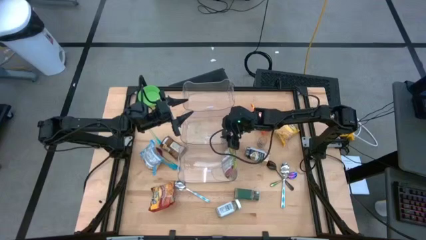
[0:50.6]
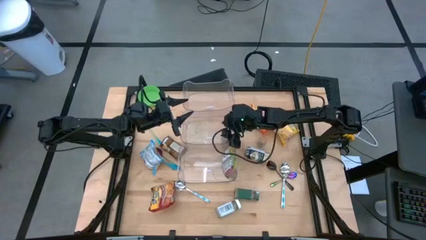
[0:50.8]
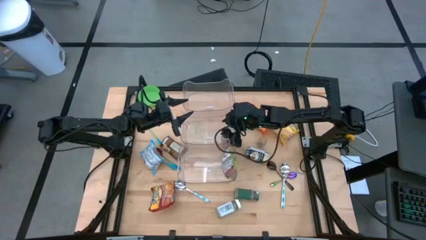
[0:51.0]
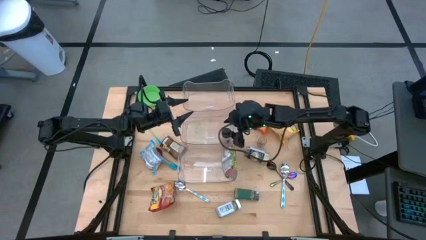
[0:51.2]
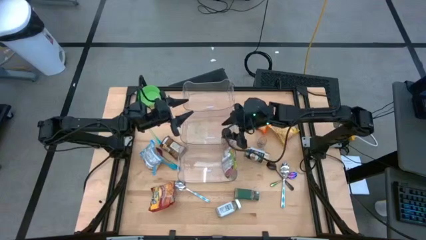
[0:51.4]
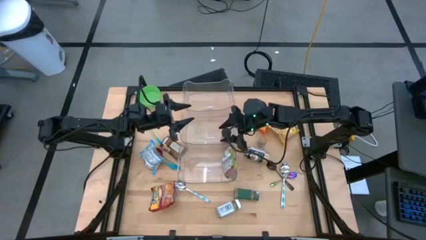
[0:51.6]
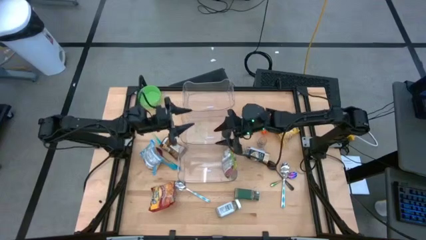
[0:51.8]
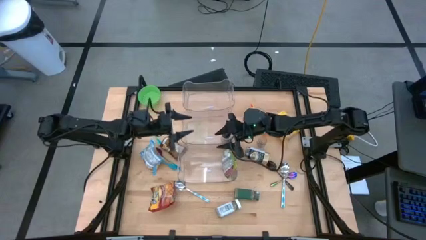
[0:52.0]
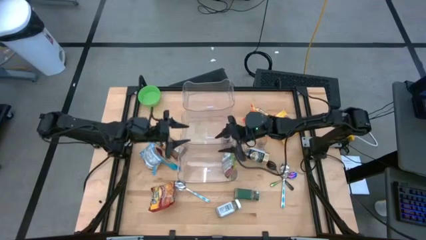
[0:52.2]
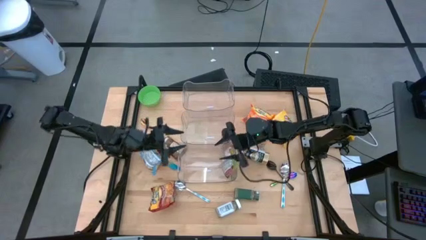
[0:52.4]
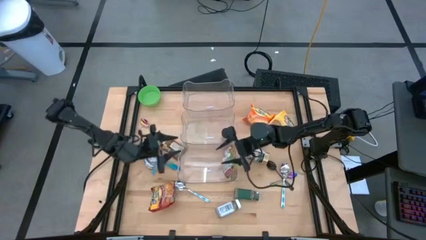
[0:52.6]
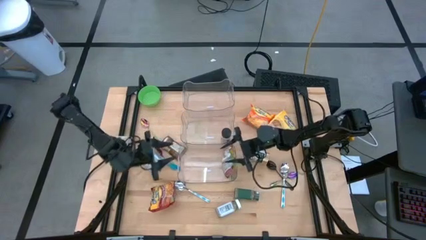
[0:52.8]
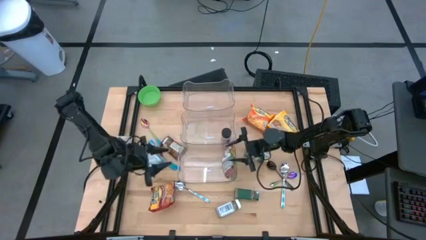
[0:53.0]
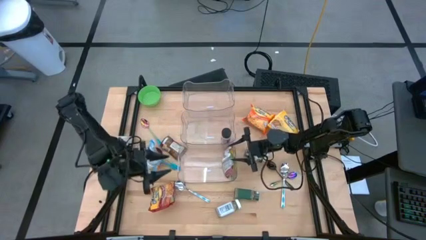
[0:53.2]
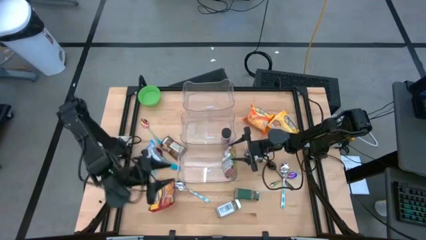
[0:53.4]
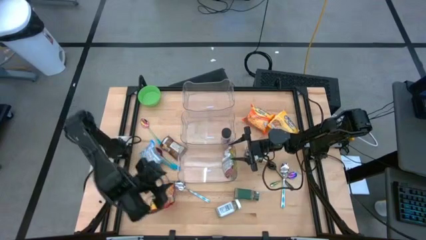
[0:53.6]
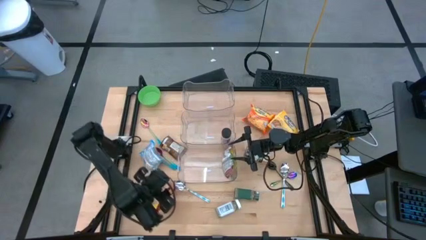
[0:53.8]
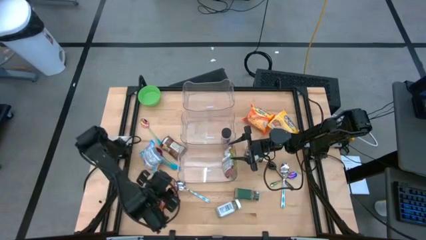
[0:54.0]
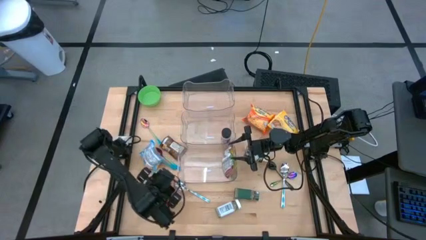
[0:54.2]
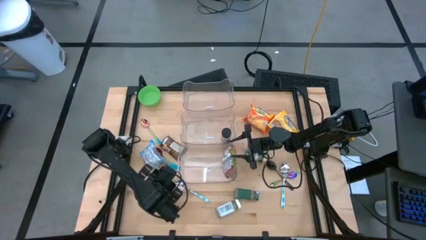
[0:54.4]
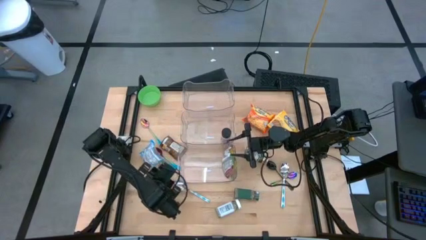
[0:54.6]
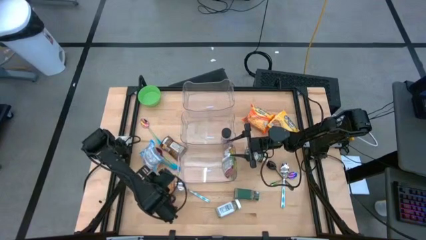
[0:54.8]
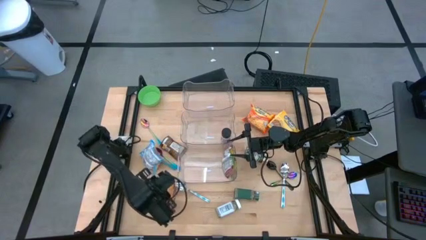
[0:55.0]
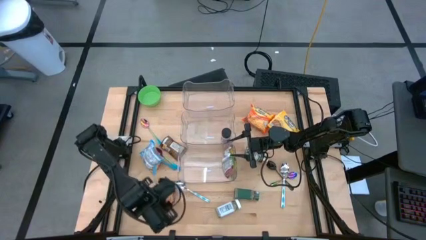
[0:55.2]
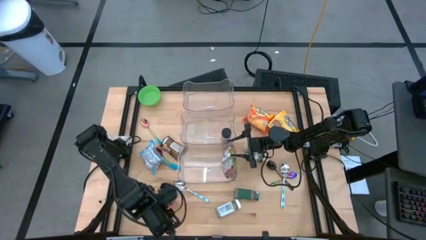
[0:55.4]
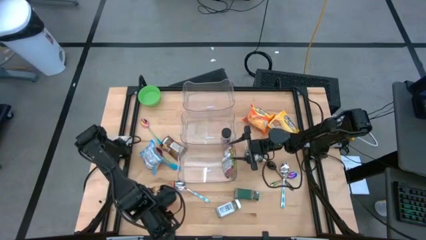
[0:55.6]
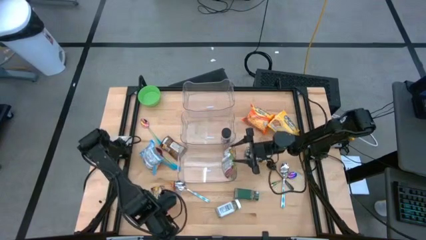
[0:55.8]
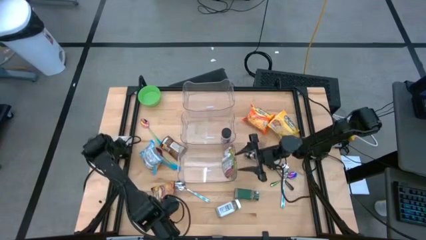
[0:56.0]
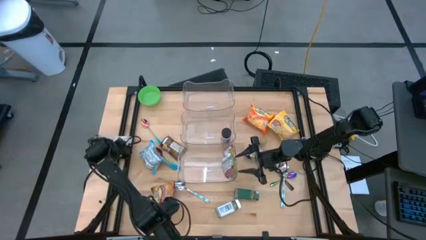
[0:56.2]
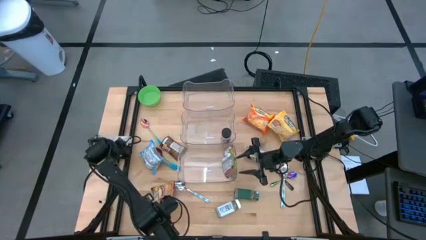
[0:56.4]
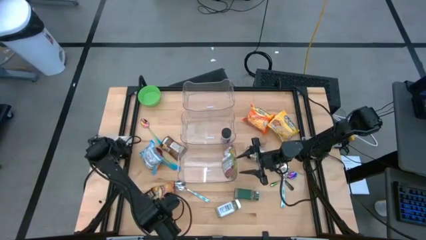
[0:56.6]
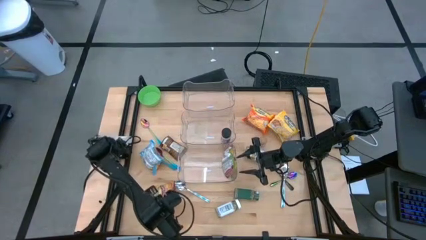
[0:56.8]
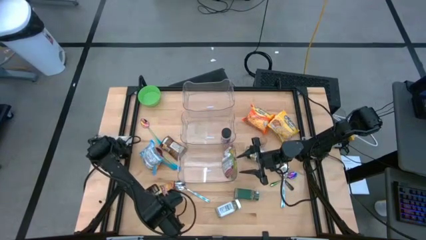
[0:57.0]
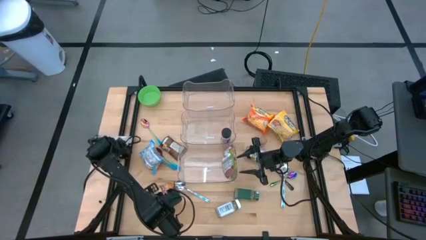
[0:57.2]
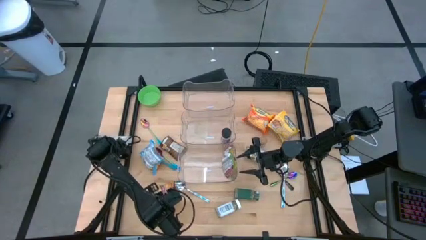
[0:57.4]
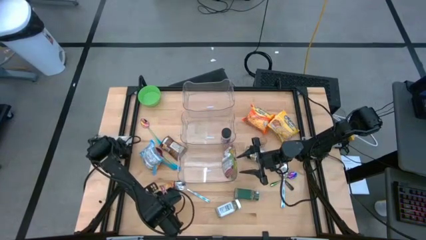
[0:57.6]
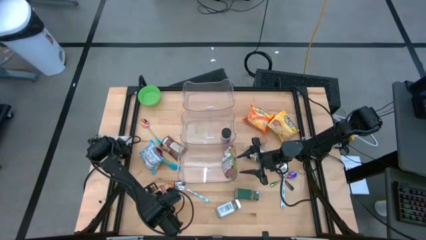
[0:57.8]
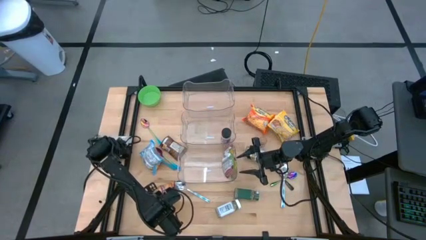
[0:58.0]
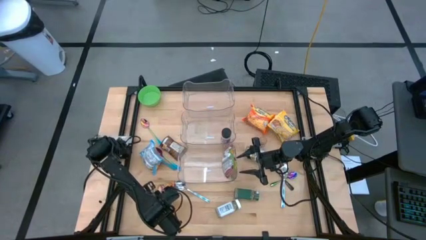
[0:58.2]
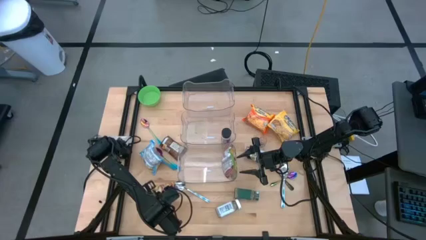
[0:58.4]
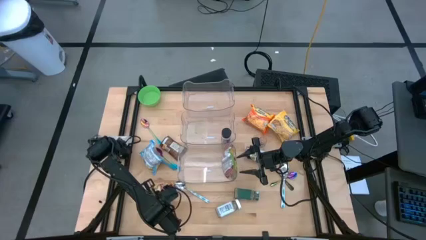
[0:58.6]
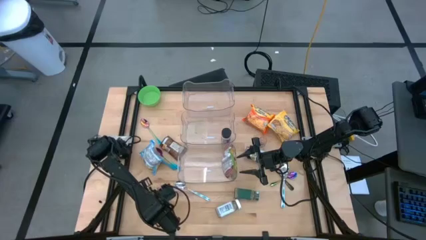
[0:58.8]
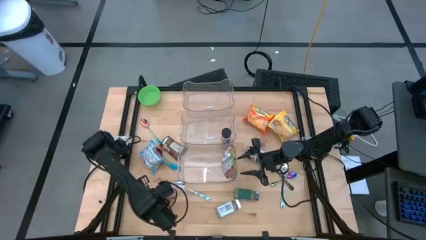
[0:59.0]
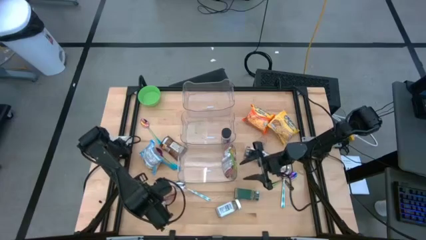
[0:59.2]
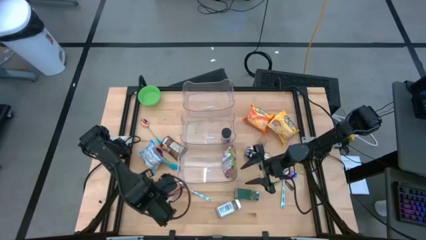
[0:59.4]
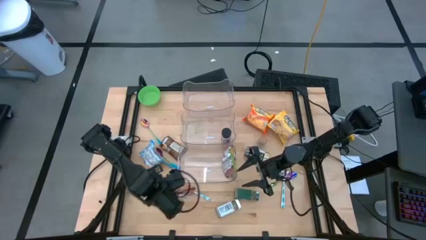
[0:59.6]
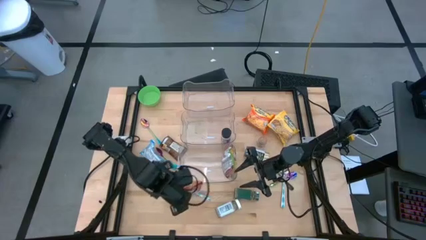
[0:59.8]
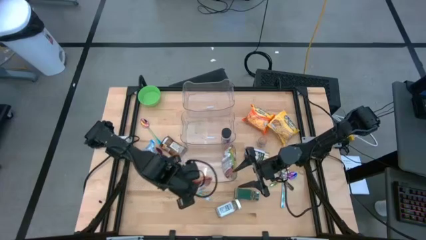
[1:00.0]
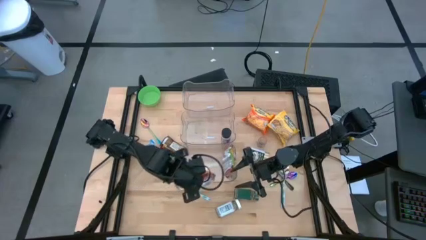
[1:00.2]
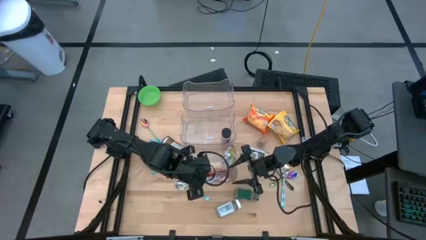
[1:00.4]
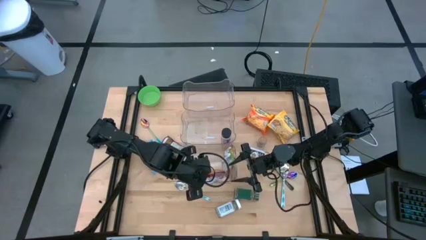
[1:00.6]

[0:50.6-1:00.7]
Task: Pick & Place Food Item
Put the red noodle pack into the bottom transparent bin

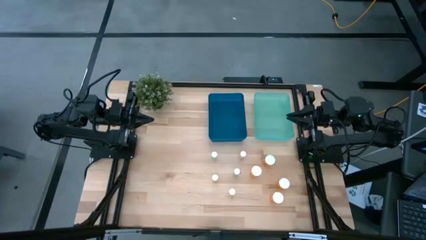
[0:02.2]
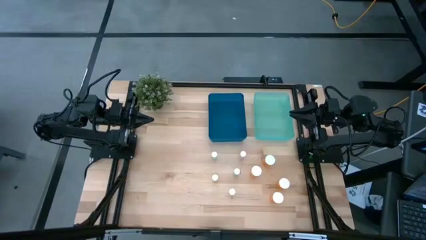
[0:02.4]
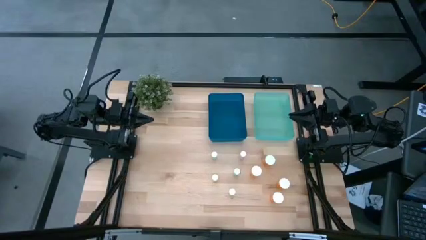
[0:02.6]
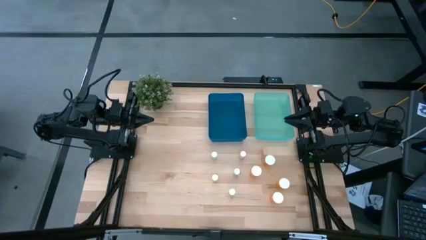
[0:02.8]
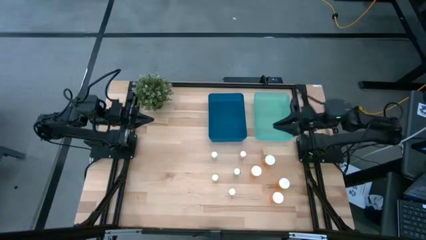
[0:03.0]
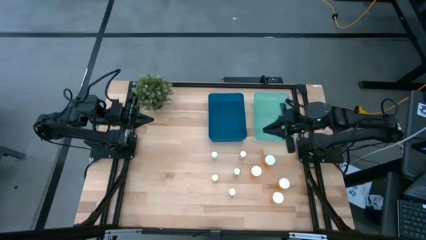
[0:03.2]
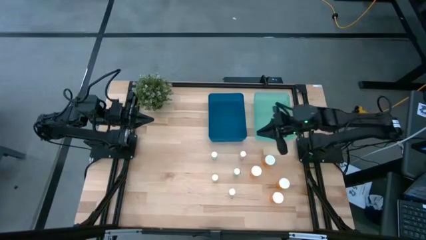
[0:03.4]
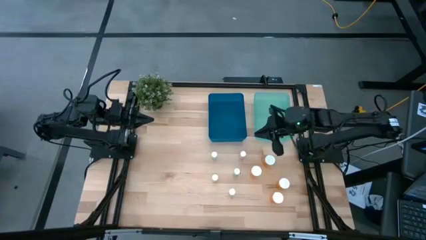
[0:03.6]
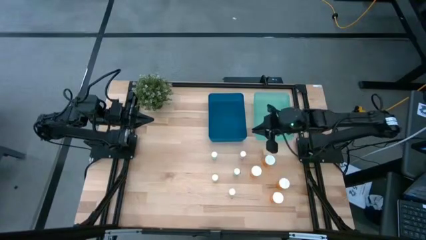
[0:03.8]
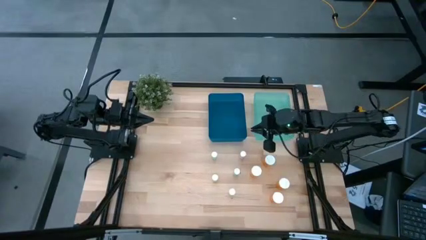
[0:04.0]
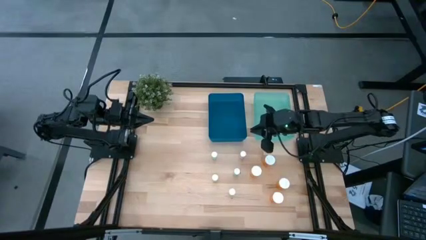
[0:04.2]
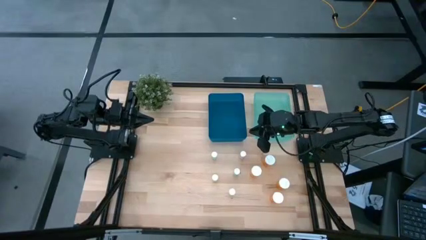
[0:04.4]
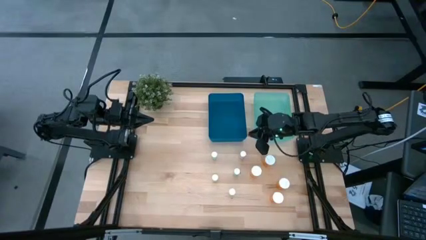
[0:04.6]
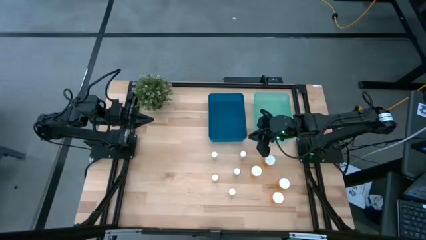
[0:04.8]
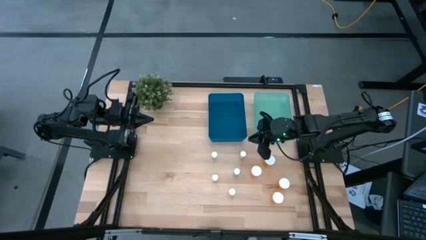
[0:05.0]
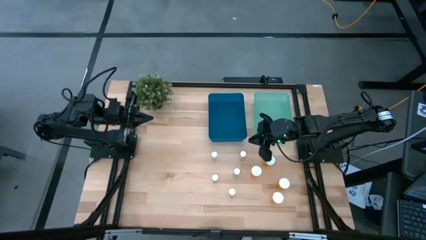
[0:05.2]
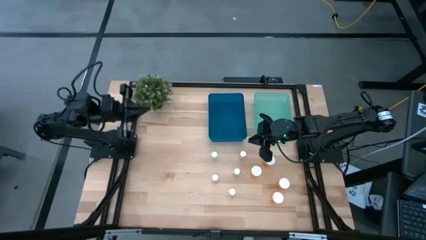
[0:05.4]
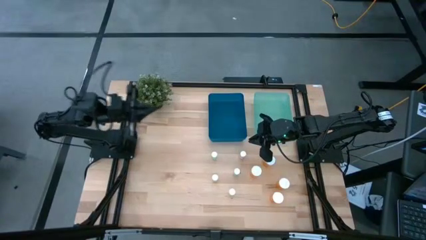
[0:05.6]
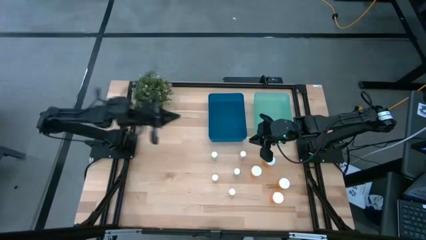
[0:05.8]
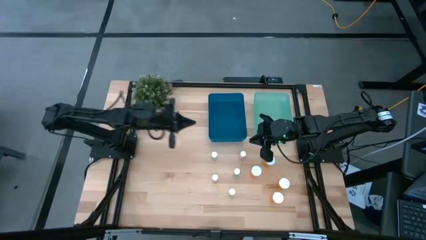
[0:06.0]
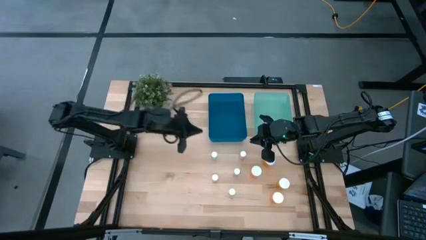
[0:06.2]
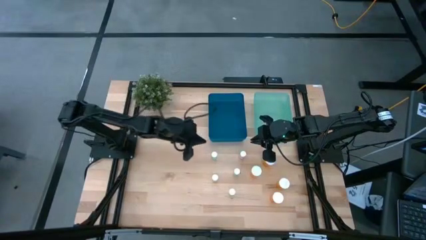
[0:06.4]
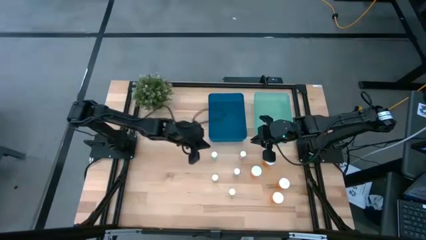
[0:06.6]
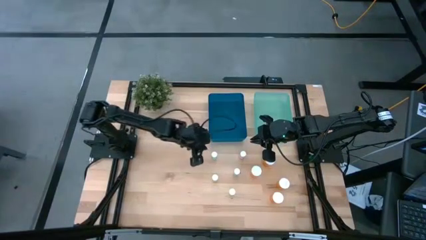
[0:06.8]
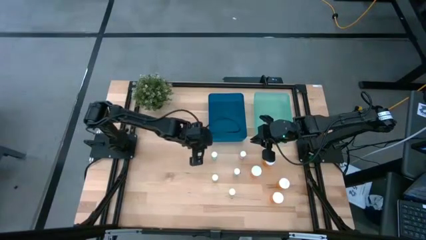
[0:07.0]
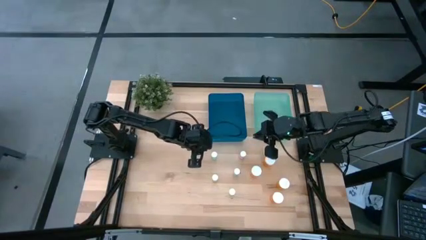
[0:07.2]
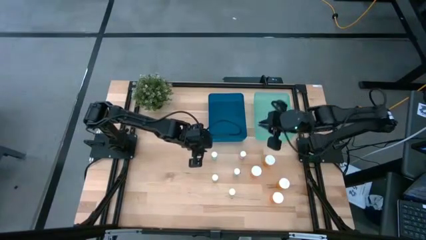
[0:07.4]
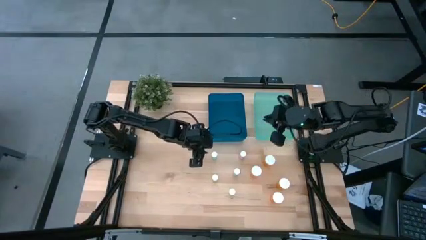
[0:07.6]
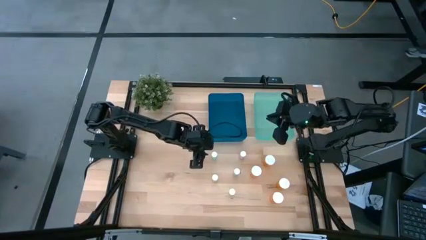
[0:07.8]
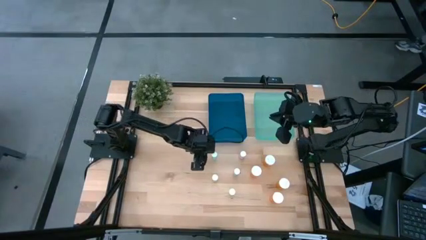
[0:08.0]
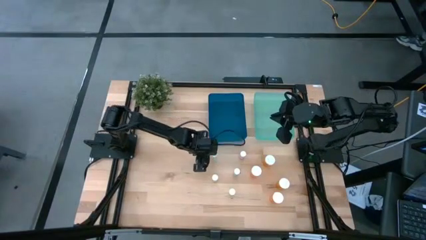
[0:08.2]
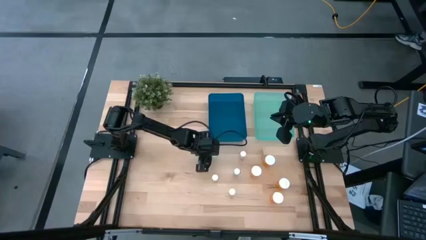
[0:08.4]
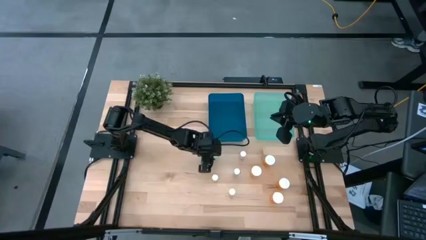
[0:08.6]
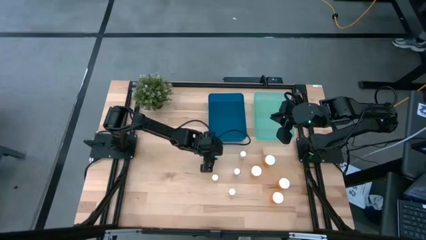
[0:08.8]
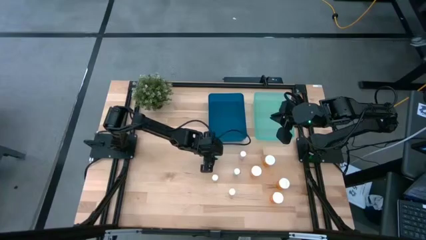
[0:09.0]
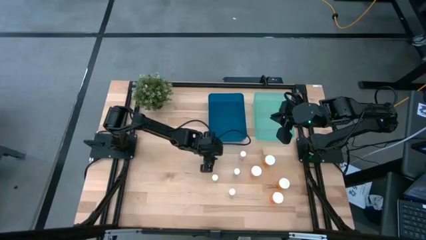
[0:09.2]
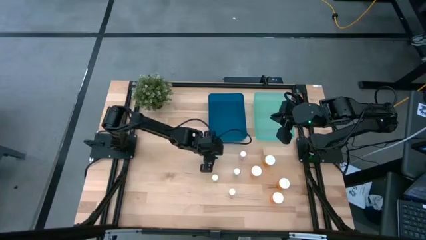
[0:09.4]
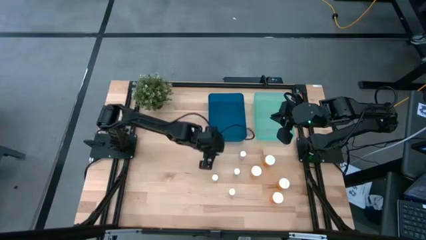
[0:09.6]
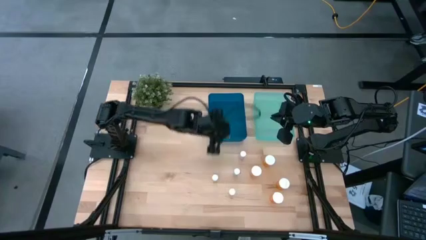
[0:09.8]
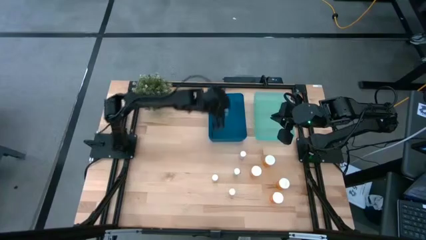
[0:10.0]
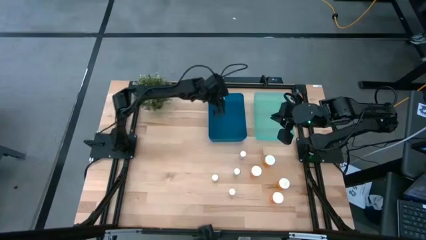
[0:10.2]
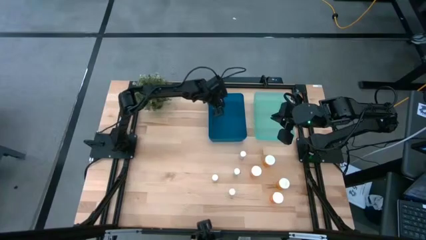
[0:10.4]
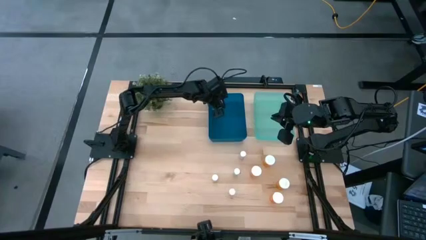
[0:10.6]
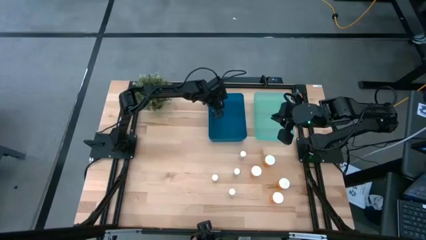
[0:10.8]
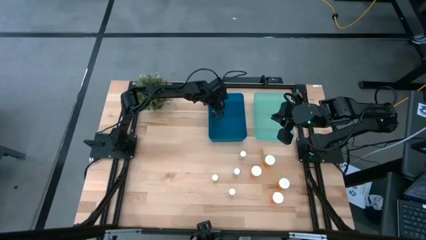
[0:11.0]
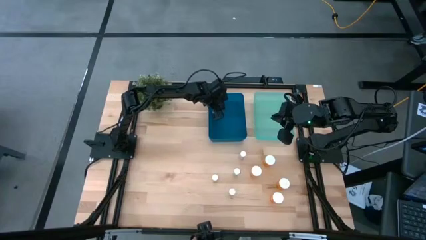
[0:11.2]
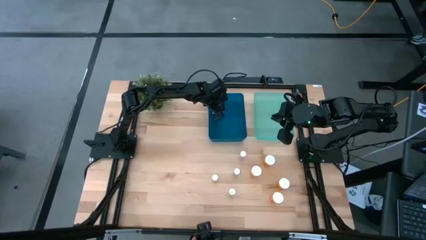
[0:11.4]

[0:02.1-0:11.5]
Task: Pick and place medicine bottles into bin by pill shape (circle, oval)
Put the top small blue pill bottle into the blue bin
